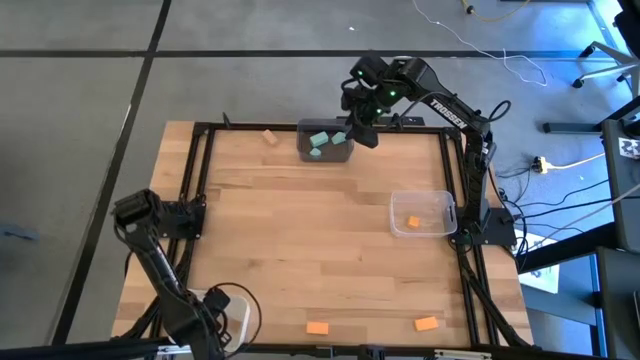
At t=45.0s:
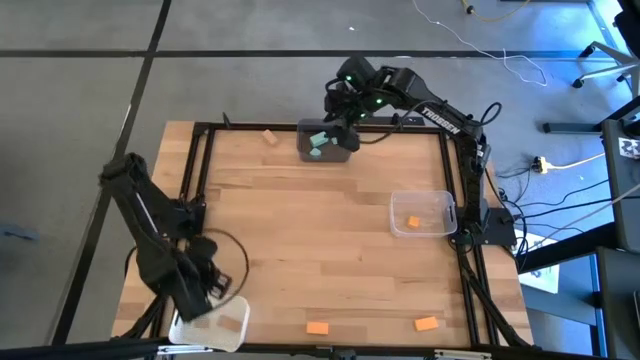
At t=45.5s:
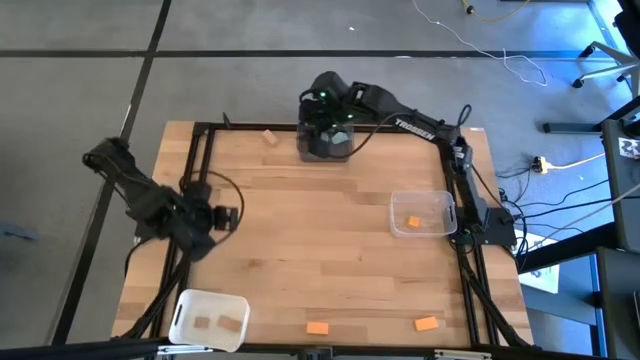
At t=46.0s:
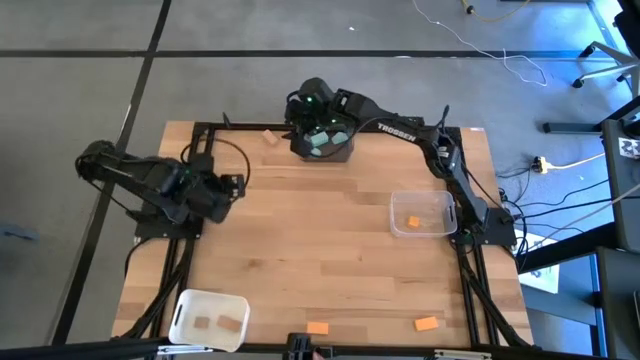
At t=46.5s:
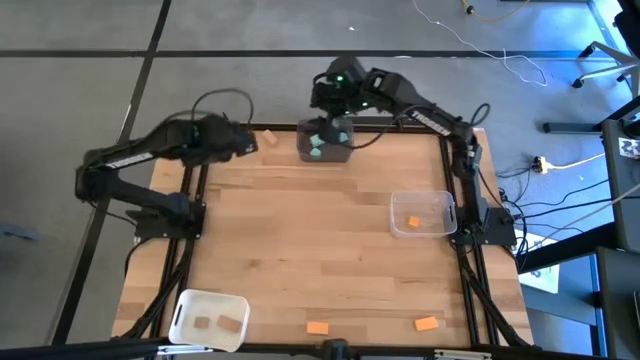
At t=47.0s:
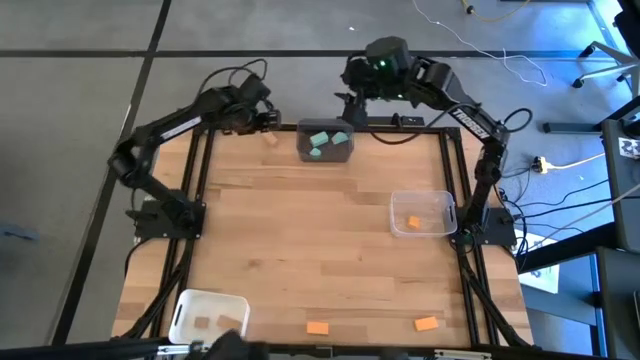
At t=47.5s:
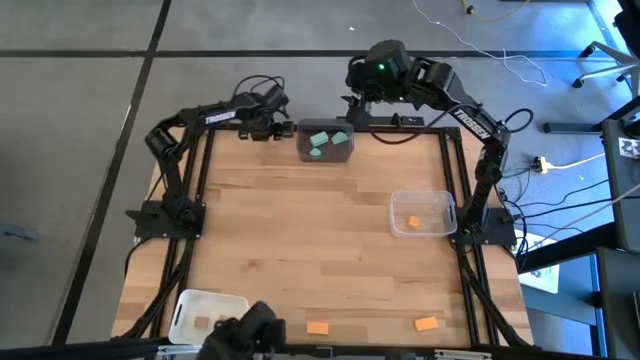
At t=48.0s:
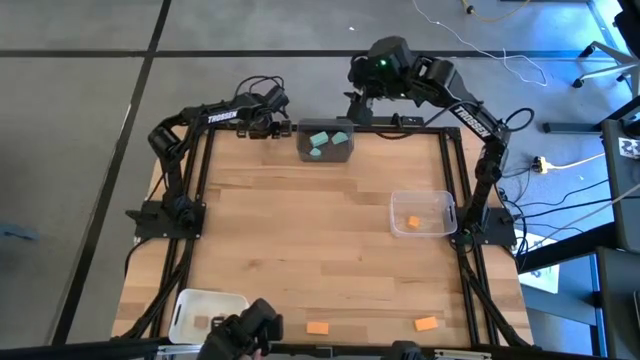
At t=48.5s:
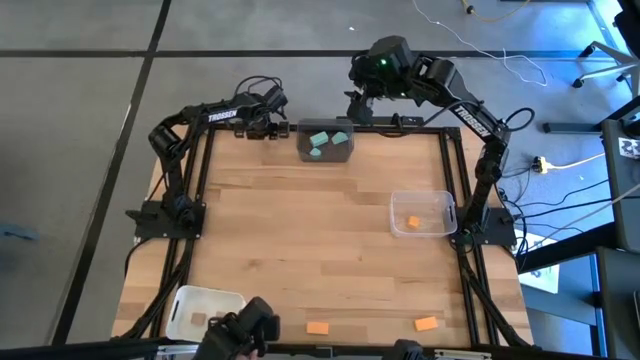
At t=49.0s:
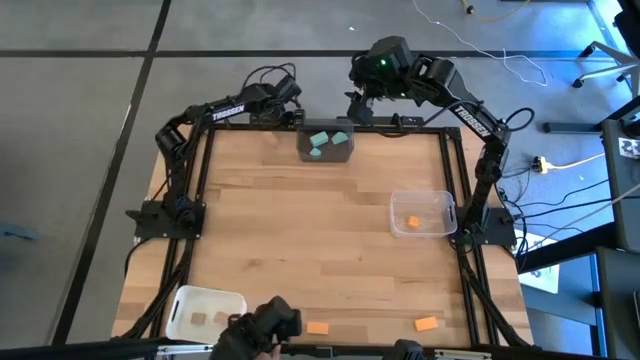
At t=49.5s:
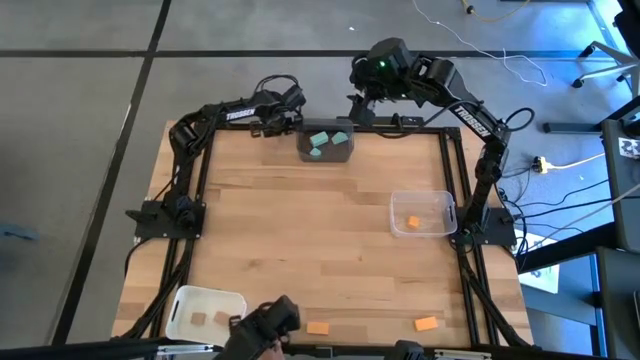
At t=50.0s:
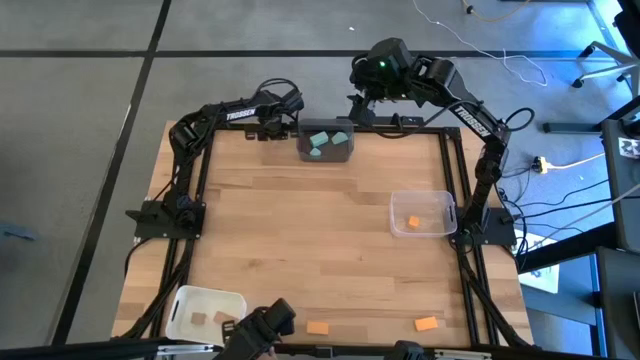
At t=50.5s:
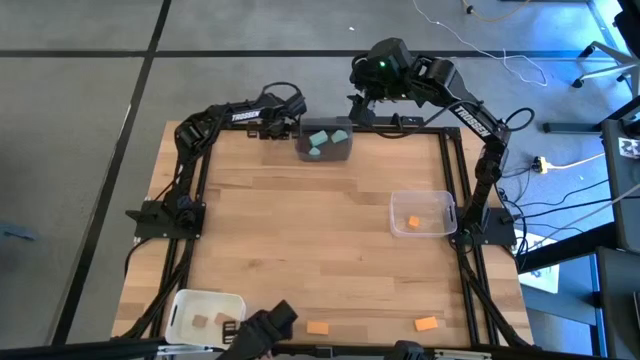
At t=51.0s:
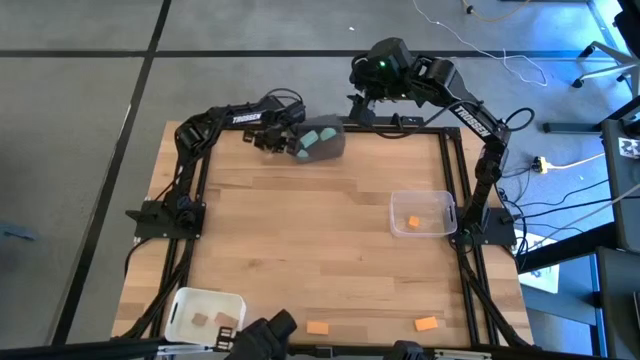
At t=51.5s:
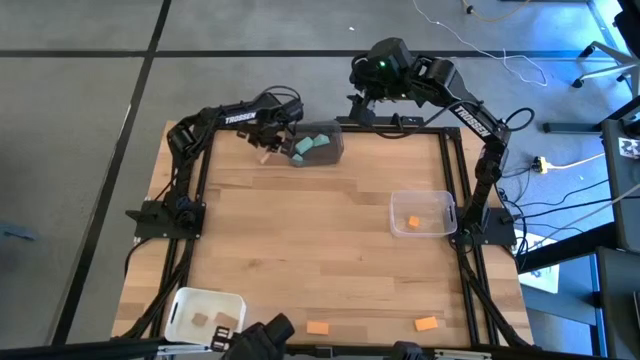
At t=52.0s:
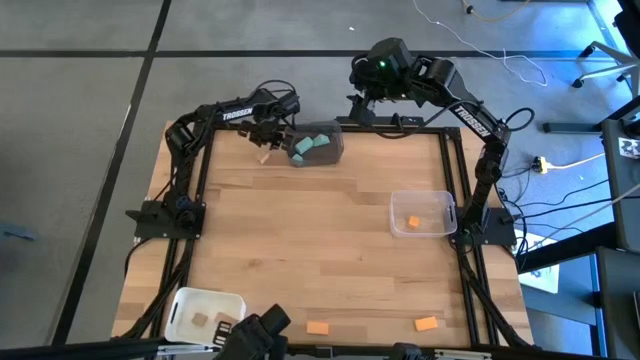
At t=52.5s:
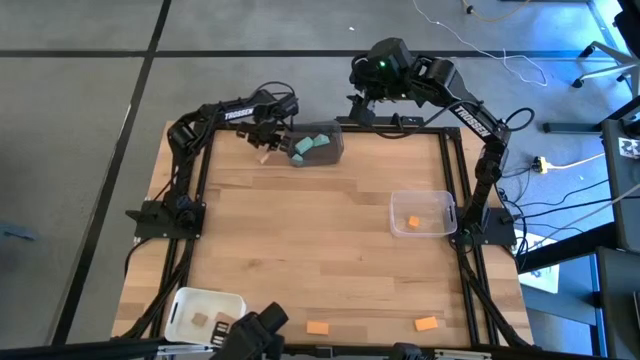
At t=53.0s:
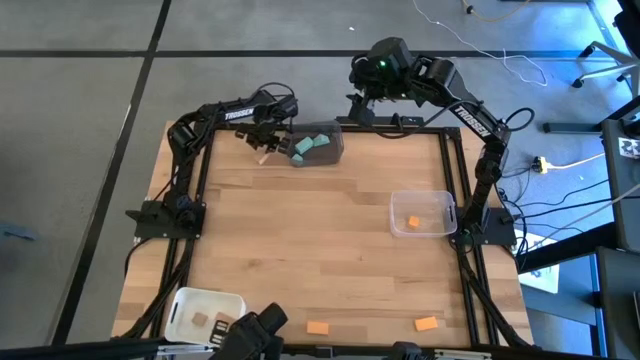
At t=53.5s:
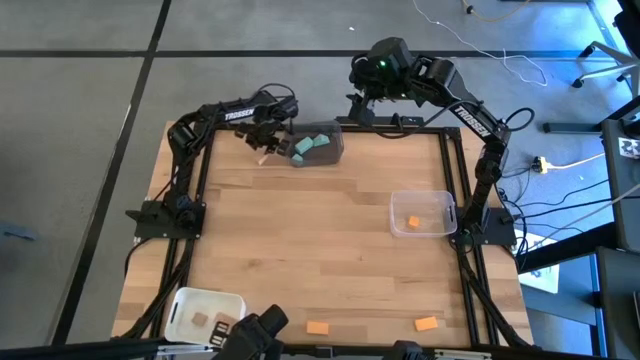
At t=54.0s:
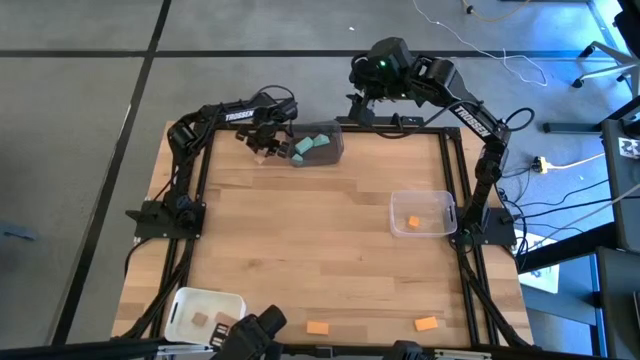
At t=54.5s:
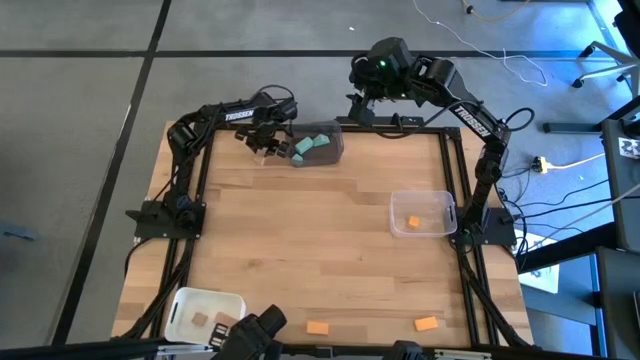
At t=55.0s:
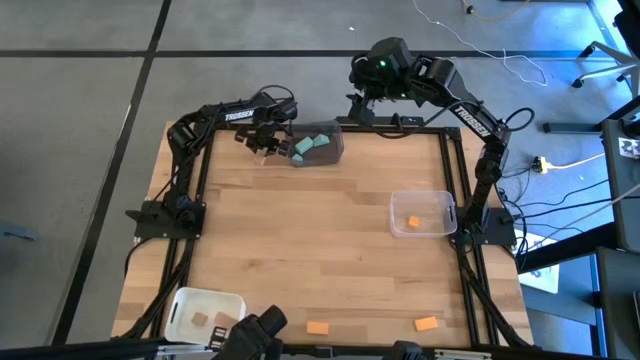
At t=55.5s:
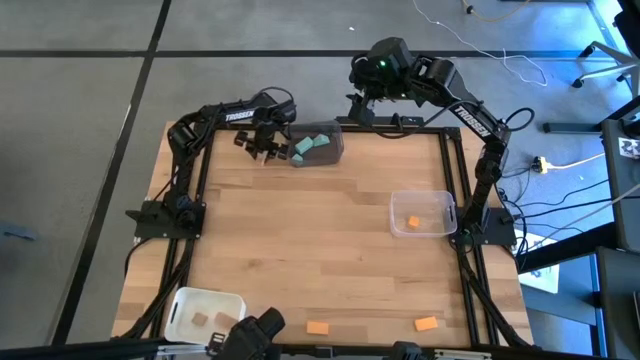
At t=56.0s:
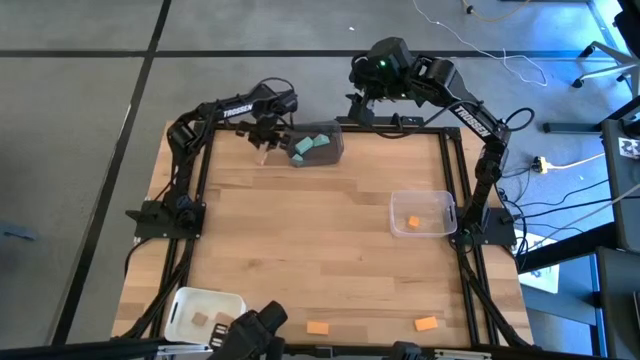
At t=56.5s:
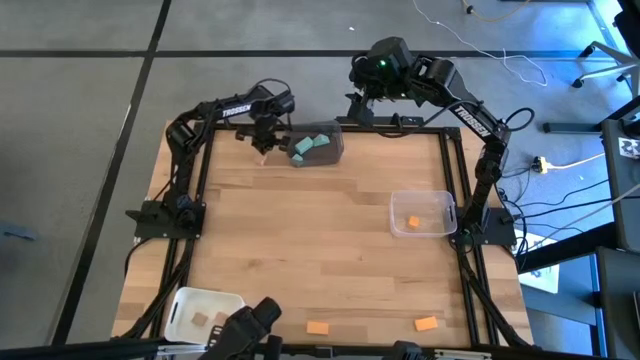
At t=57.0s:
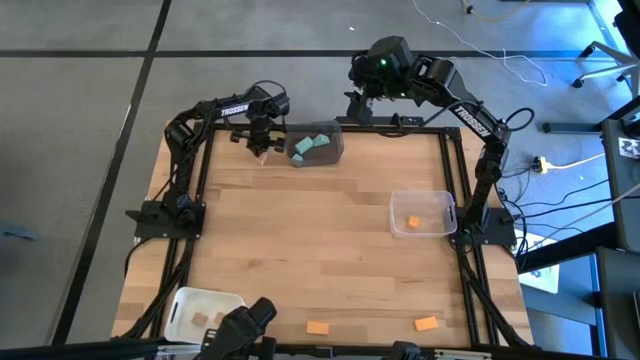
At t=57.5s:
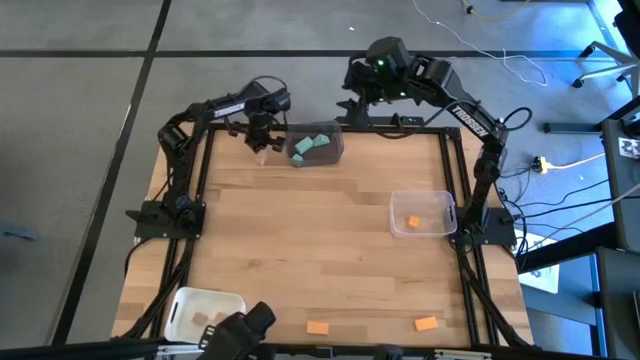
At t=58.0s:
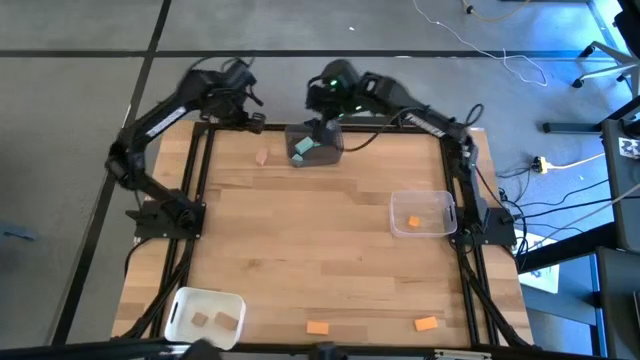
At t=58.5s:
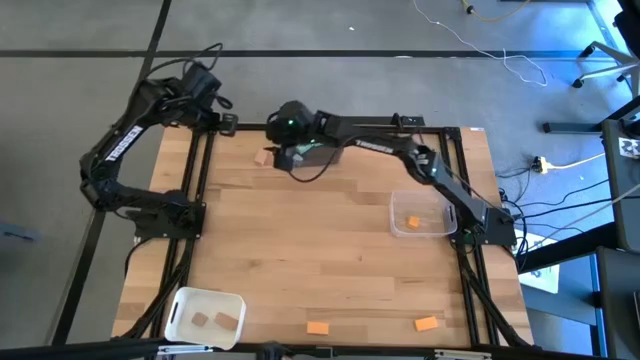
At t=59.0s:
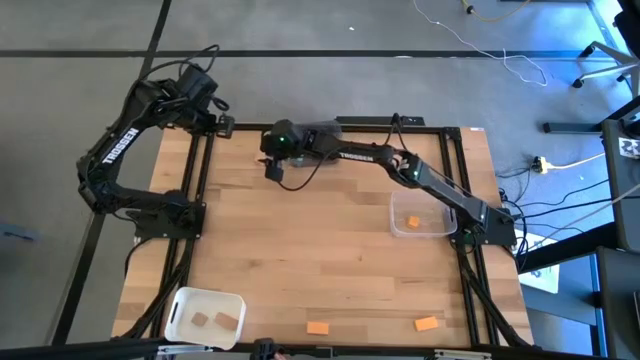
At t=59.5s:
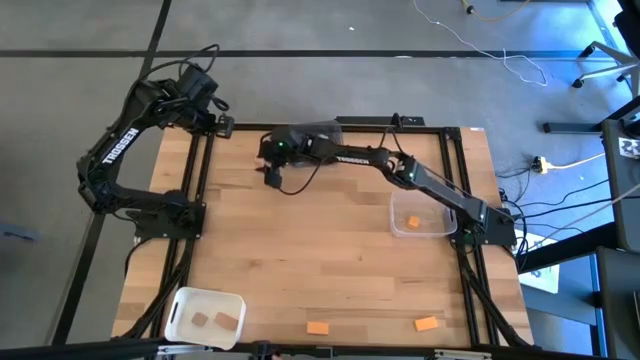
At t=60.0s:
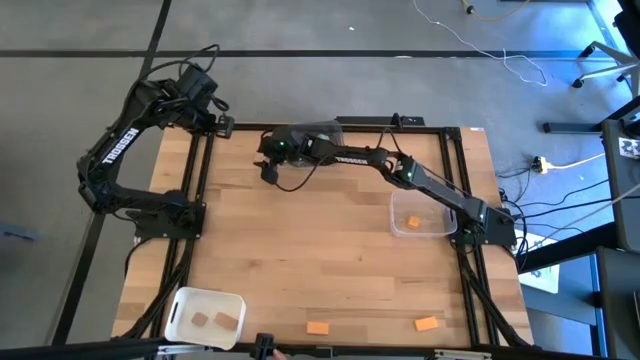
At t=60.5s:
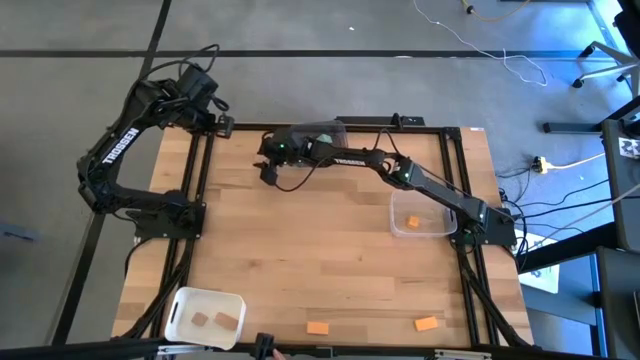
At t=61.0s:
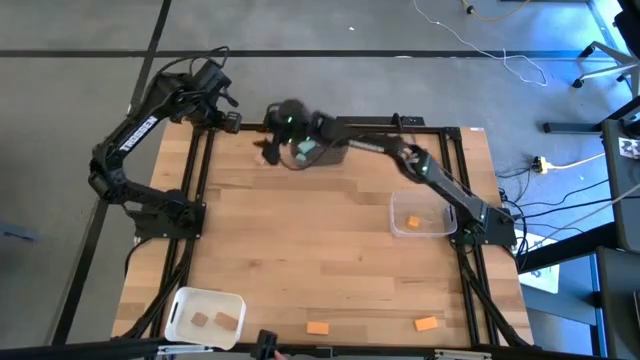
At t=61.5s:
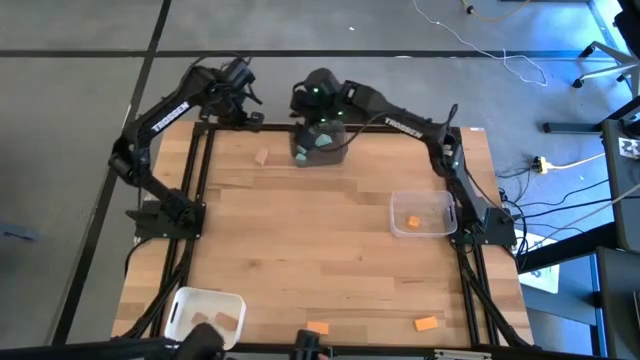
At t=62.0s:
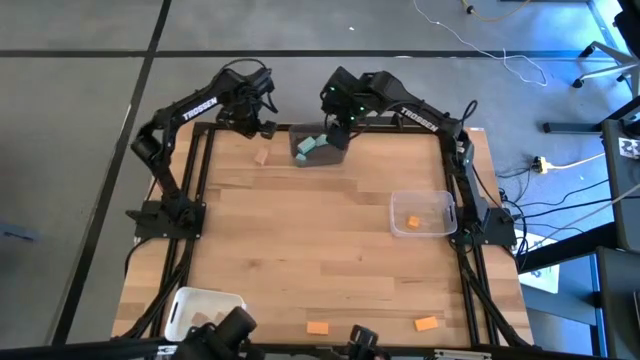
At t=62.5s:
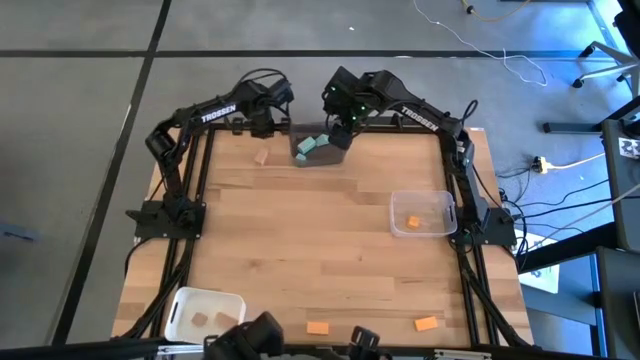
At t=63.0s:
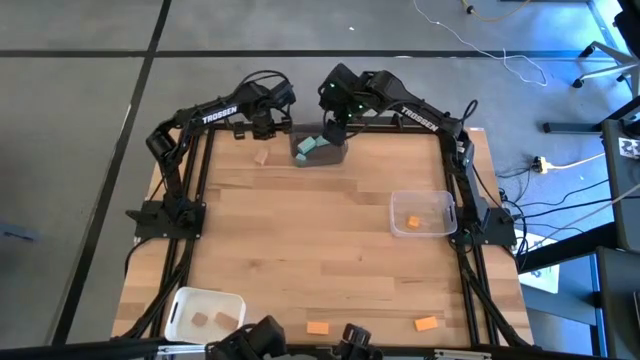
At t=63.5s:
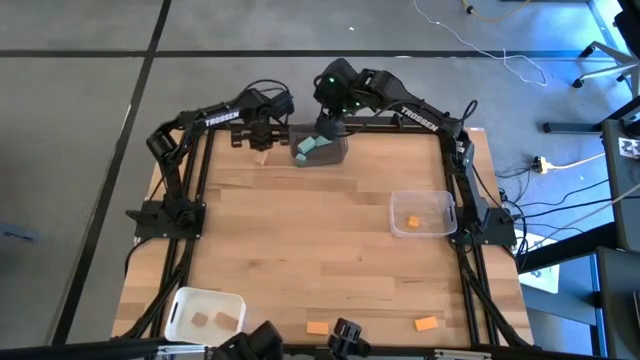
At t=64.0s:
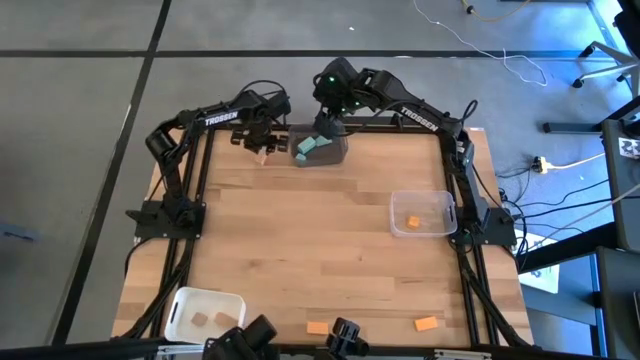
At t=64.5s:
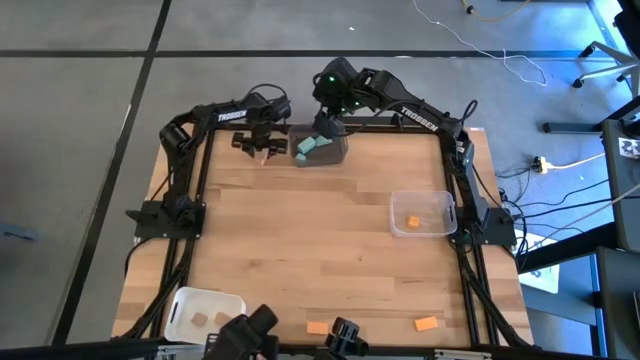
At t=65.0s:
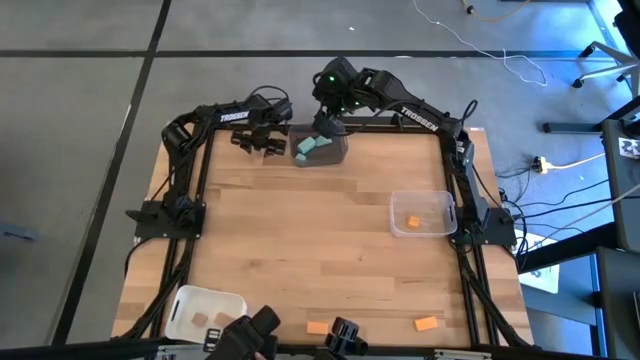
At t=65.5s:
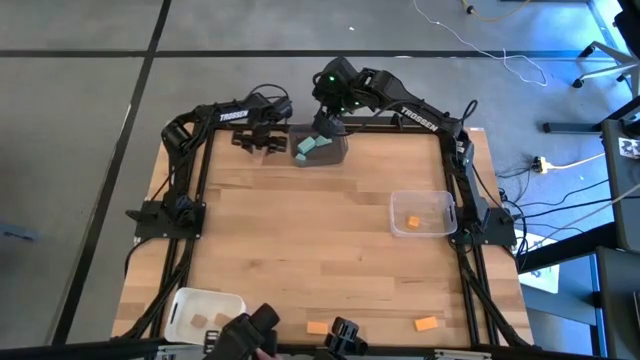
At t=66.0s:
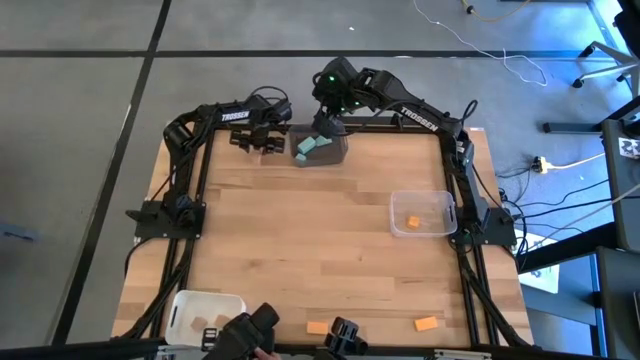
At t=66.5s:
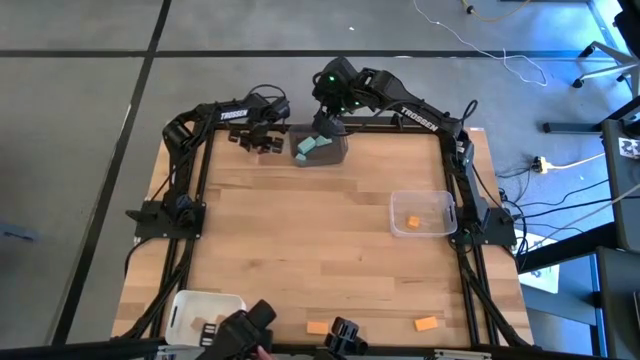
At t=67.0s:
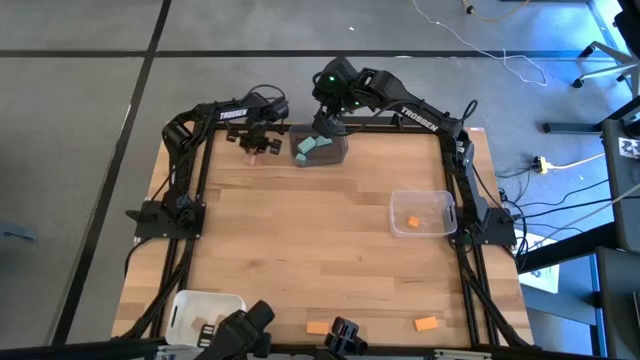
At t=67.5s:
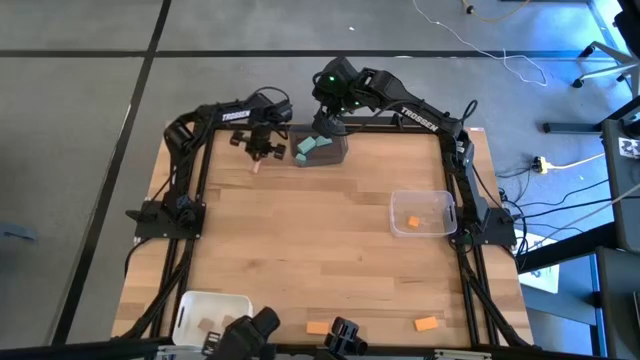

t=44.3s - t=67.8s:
Task: Sort & place blocks by color
Put the brown block into the white bin
